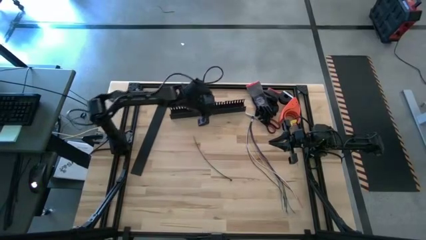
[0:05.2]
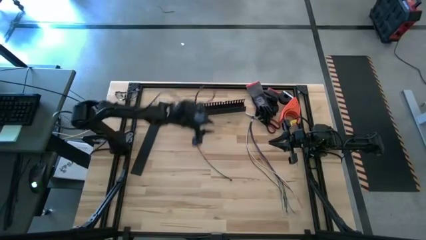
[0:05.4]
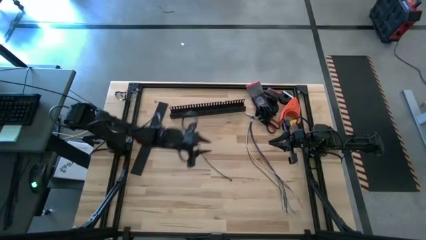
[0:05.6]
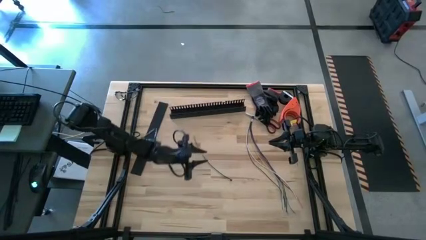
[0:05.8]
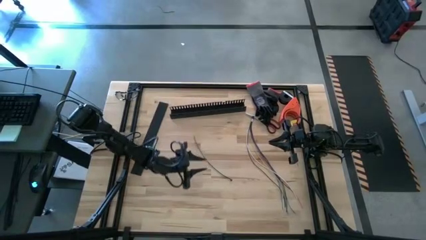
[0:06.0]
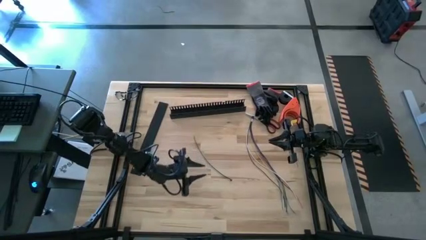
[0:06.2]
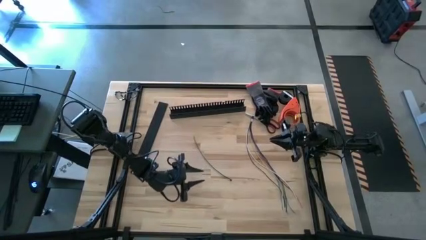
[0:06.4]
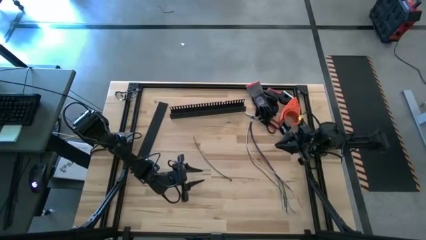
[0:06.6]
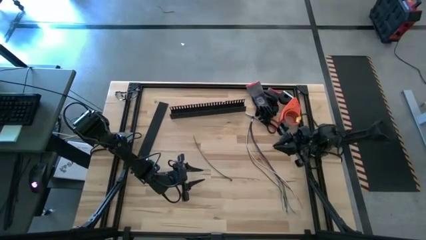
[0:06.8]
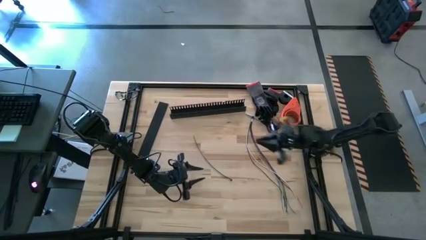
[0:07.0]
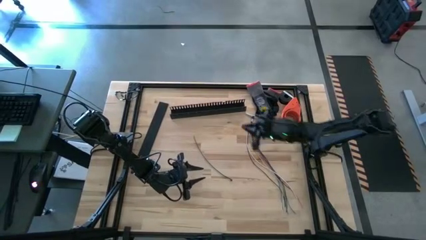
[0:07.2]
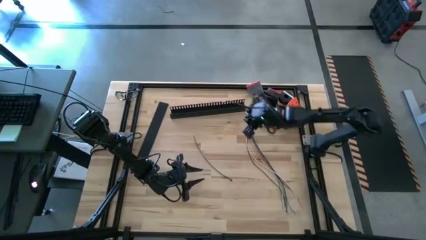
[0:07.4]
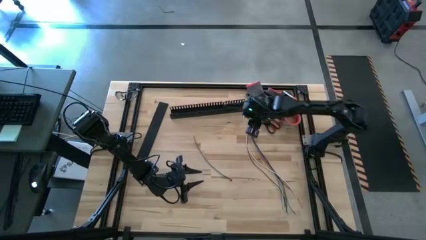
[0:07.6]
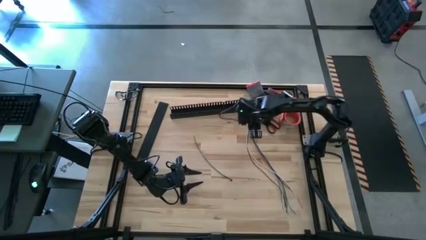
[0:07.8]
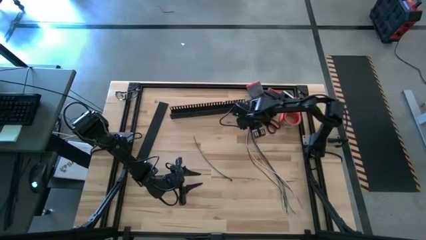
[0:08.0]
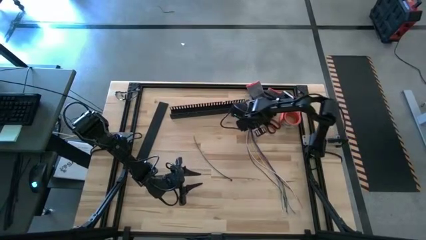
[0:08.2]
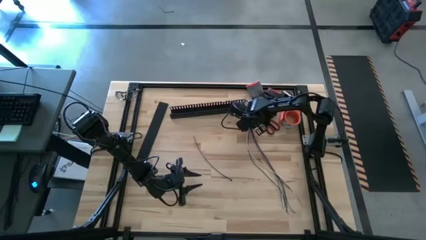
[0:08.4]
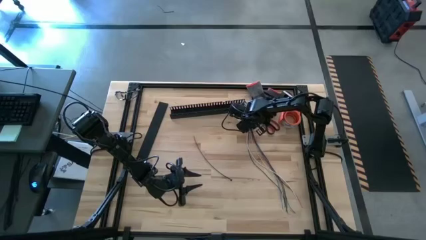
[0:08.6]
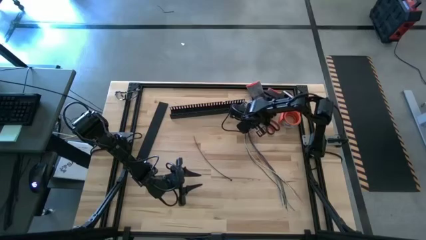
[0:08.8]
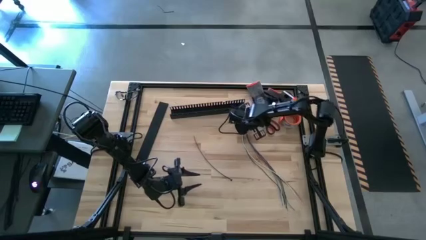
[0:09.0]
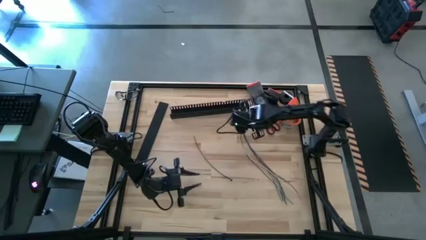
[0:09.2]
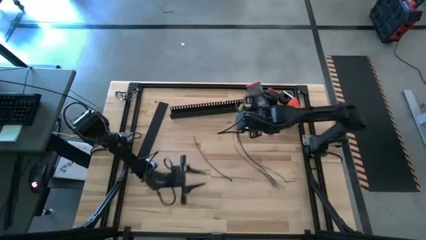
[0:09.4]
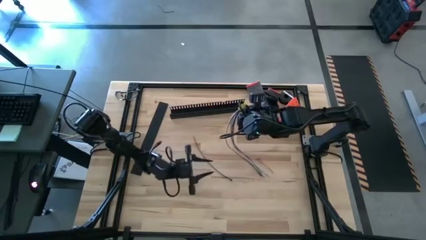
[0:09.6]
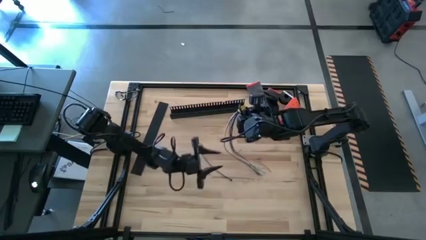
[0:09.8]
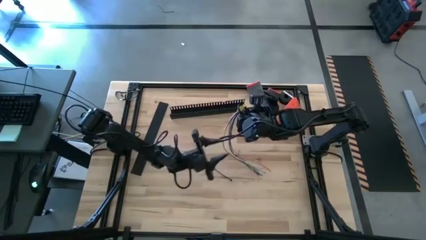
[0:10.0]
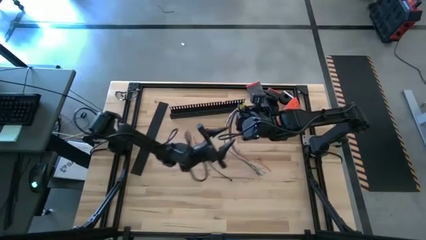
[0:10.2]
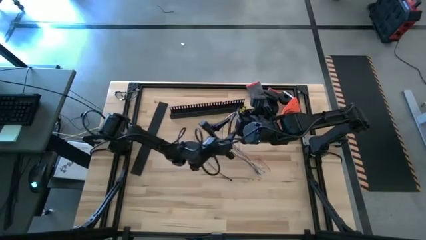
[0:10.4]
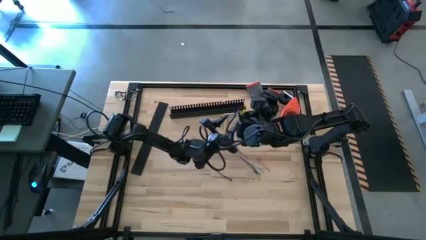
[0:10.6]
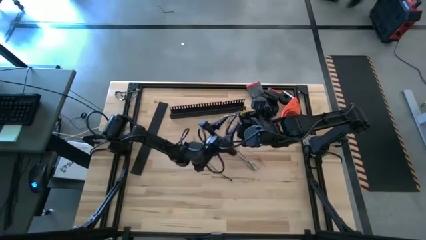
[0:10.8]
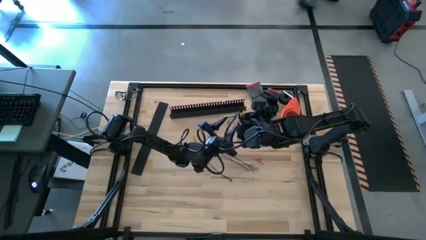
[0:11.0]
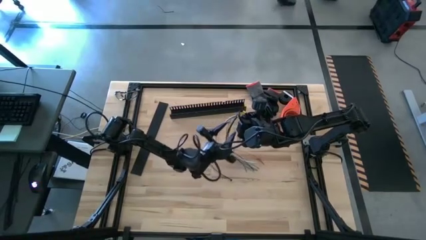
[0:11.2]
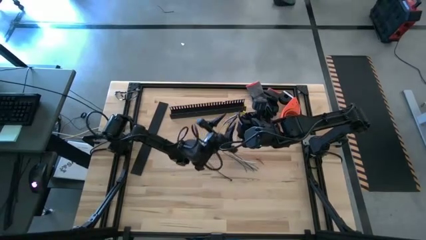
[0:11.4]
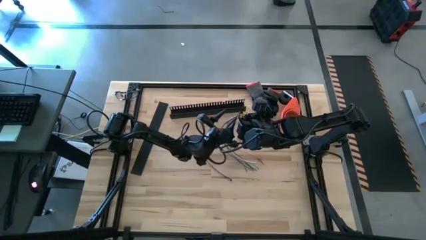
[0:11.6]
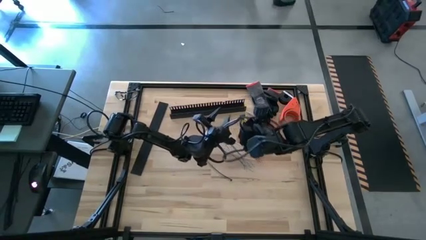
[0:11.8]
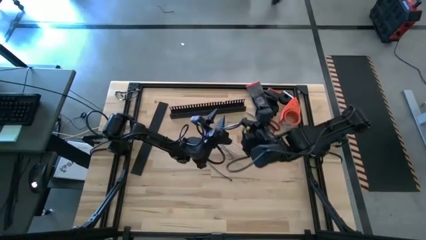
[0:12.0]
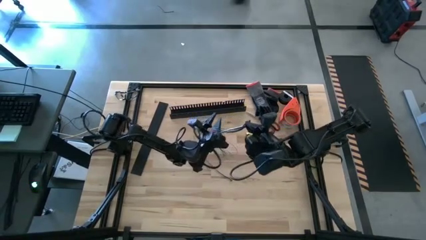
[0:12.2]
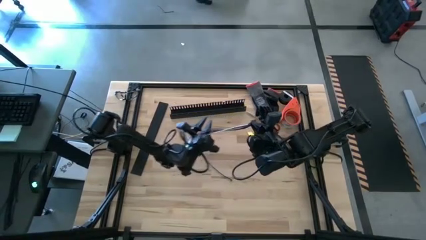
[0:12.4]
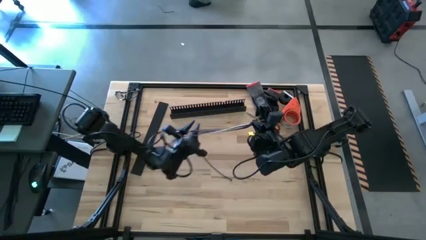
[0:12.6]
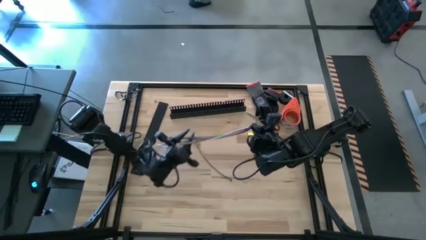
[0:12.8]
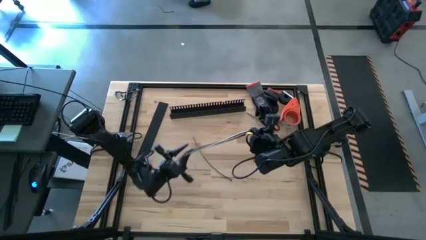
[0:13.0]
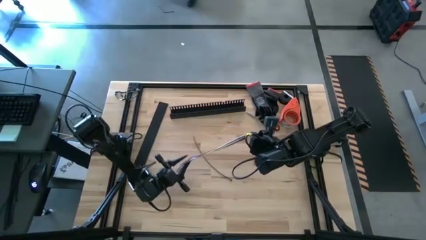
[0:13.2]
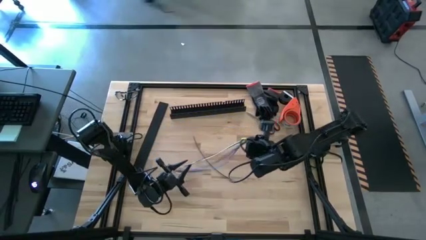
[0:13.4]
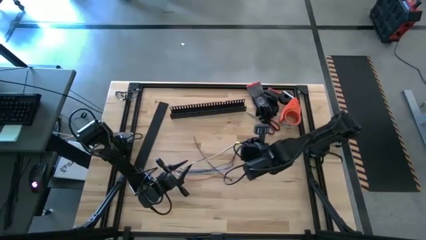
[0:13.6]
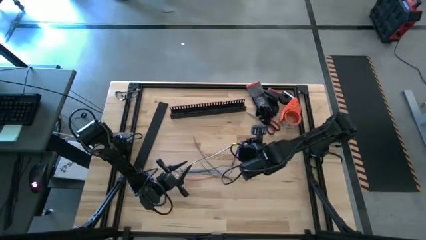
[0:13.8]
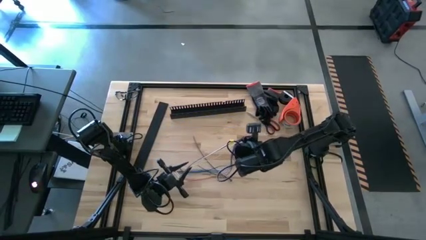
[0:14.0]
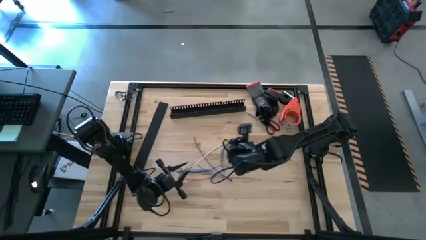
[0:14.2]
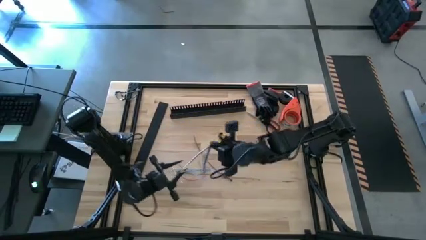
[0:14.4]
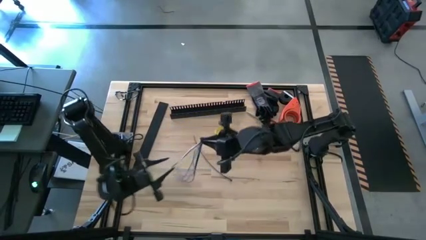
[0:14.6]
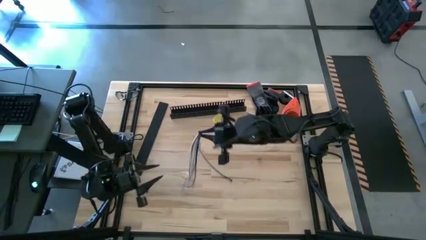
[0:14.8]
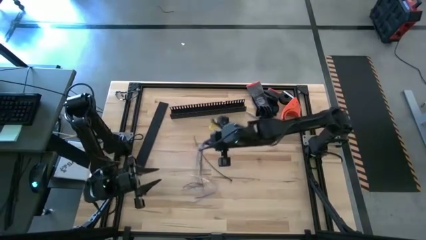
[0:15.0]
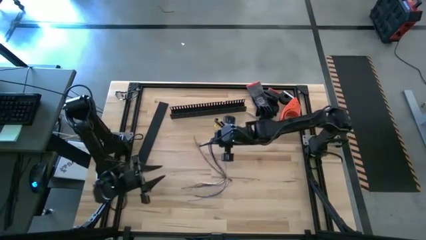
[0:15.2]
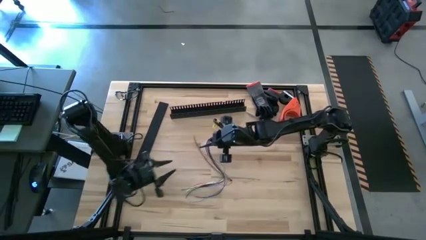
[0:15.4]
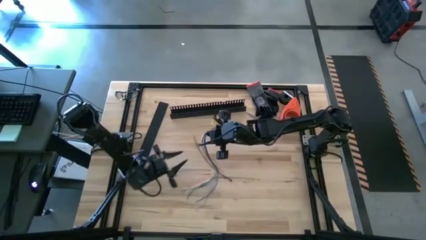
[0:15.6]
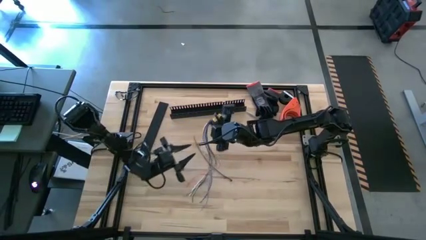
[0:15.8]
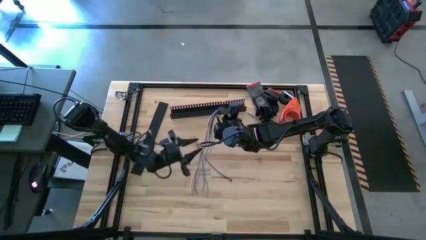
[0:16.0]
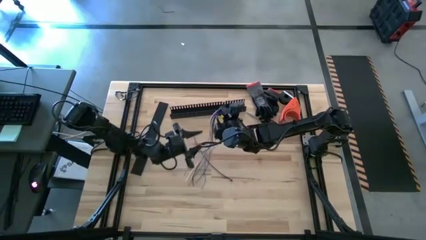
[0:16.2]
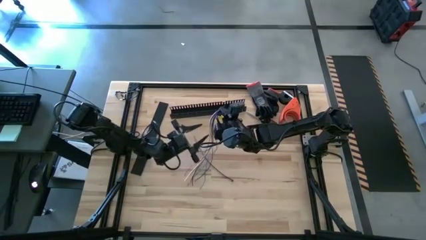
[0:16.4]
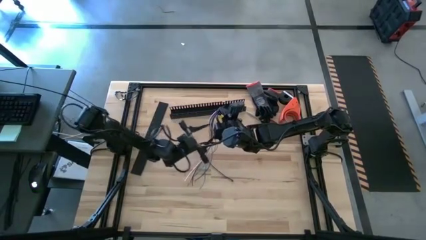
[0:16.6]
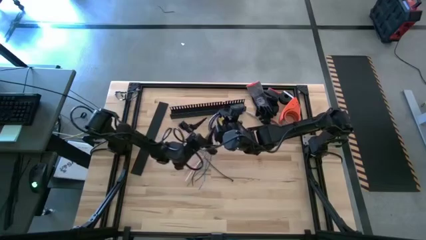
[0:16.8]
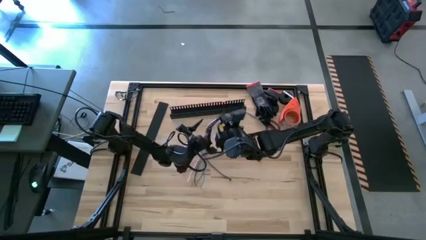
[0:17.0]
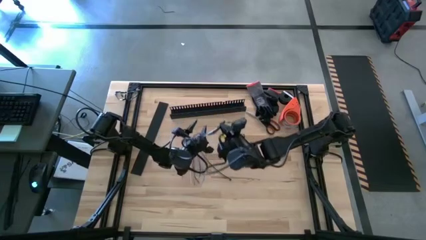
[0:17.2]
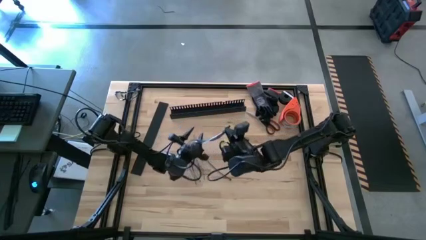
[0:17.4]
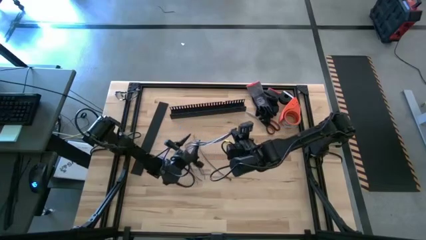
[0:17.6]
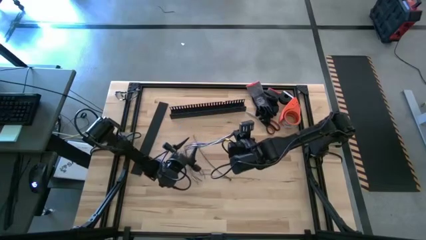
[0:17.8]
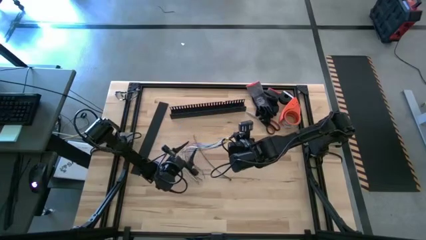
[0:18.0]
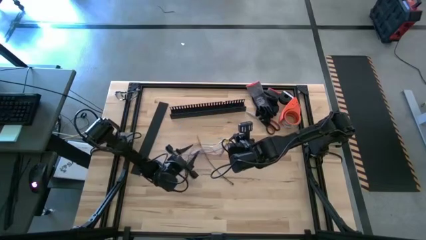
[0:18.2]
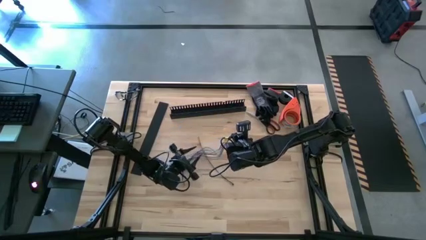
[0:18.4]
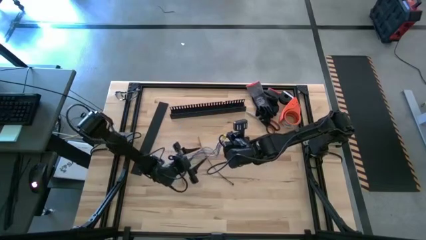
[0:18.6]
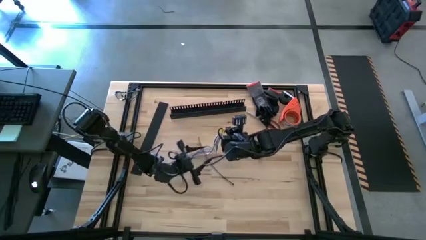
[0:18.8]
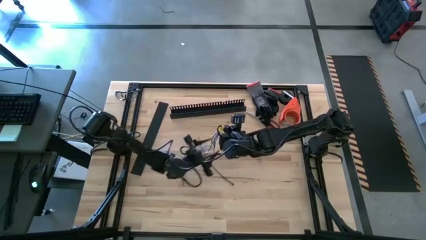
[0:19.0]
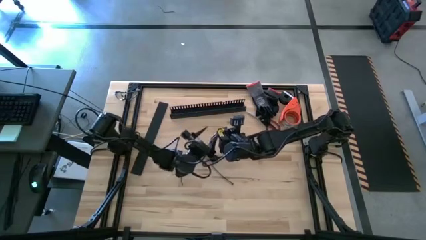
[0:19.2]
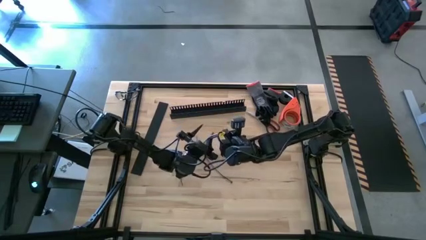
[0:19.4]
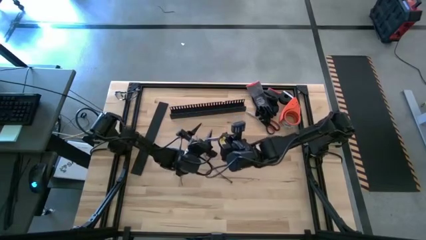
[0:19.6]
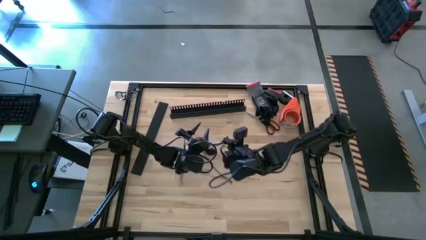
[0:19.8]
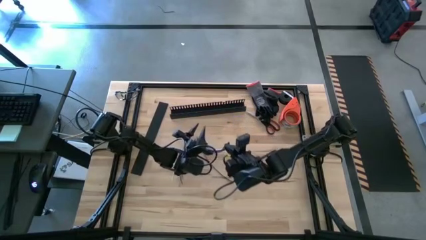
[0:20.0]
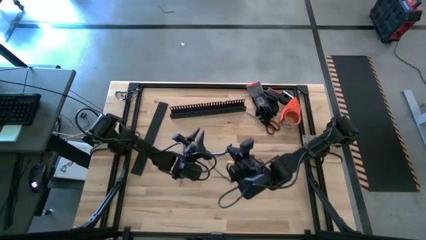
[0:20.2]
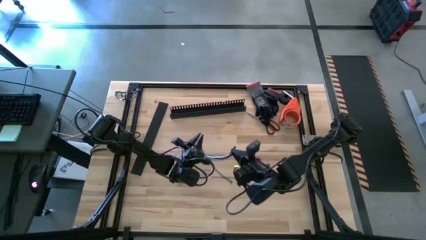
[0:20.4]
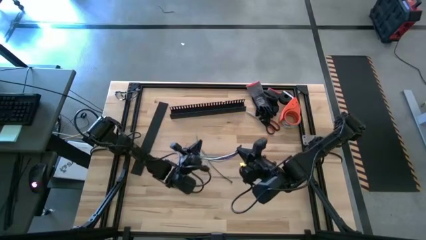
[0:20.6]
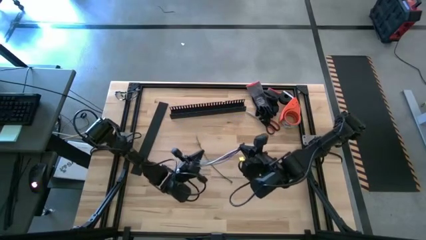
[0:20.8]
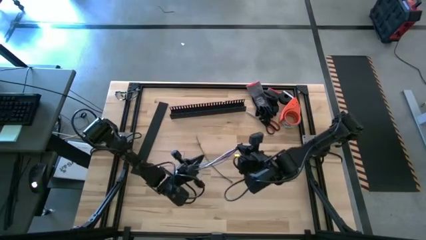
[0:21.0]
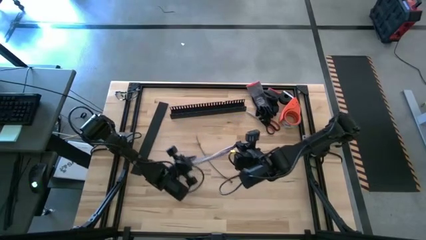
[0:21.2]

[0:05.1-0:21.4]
Task: Ziptie cables
Wrap the cables together using a black zip tie
